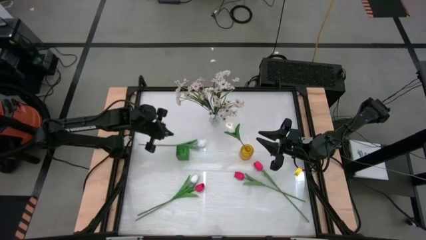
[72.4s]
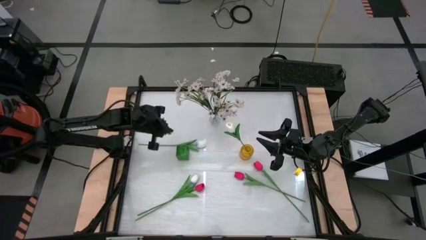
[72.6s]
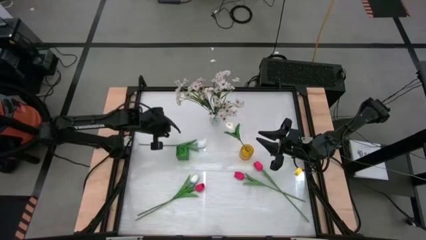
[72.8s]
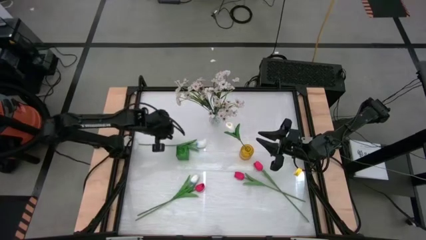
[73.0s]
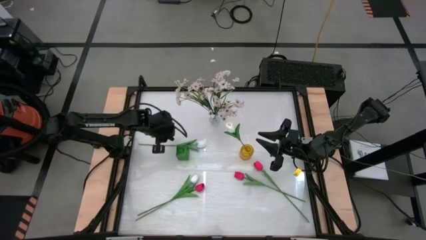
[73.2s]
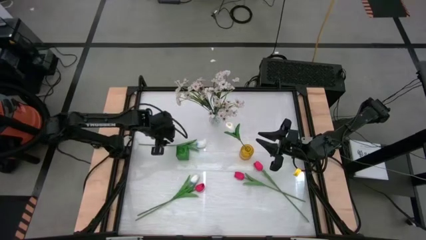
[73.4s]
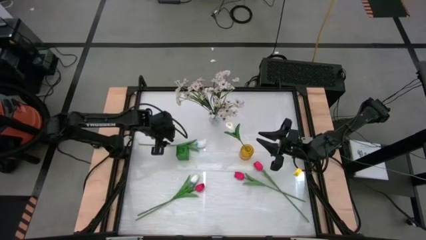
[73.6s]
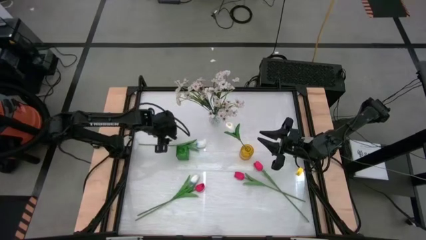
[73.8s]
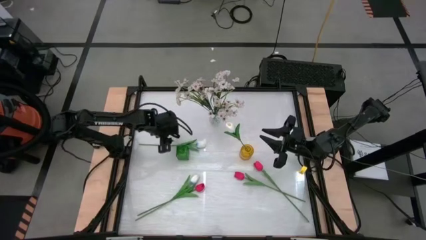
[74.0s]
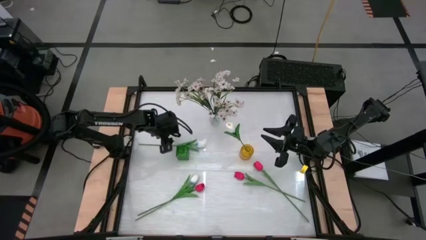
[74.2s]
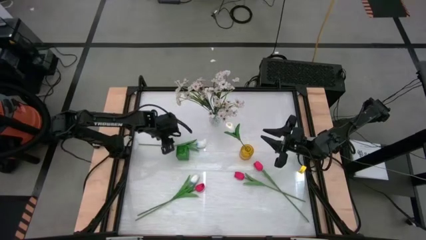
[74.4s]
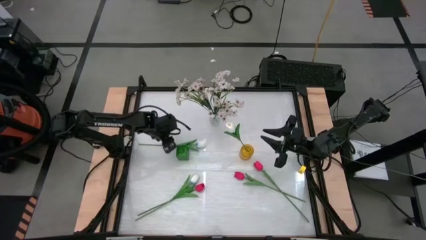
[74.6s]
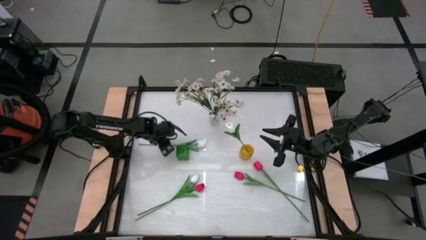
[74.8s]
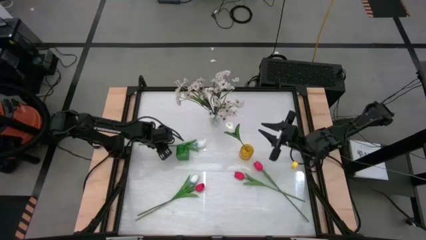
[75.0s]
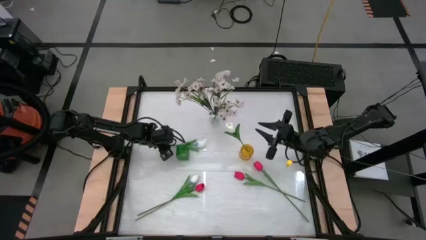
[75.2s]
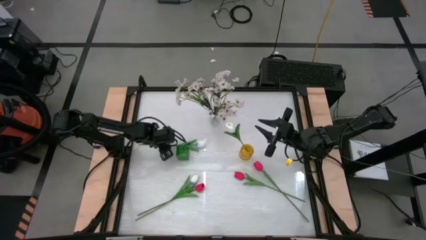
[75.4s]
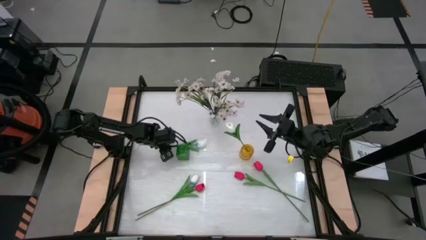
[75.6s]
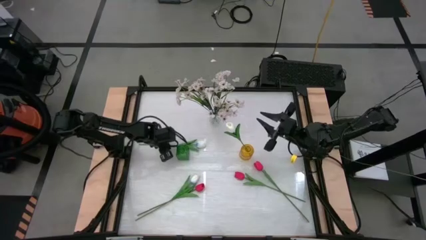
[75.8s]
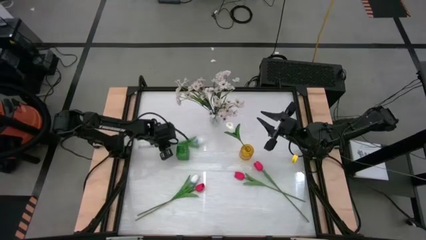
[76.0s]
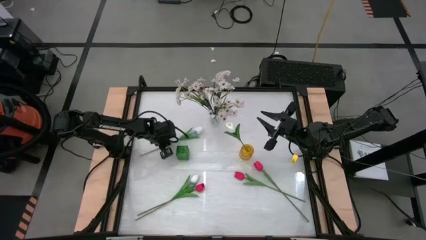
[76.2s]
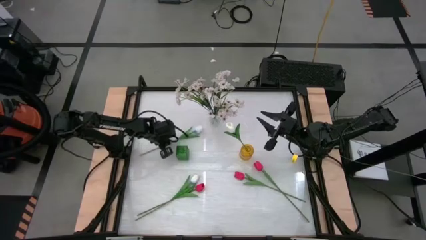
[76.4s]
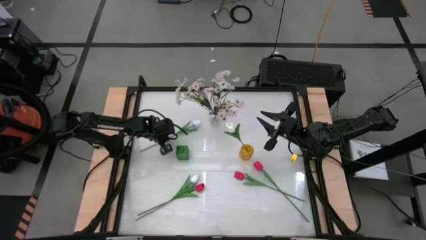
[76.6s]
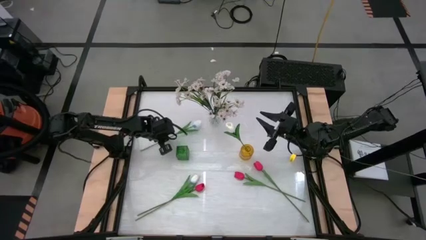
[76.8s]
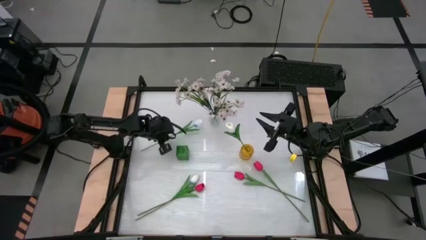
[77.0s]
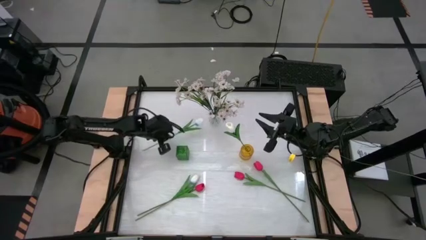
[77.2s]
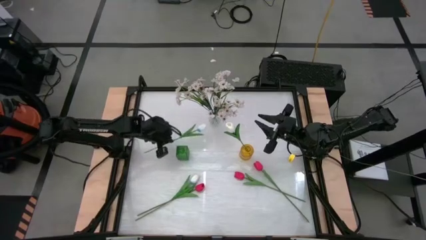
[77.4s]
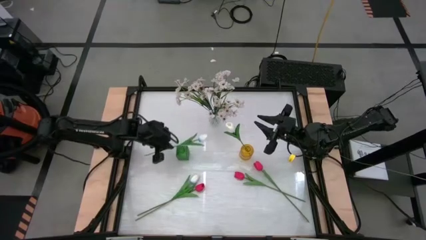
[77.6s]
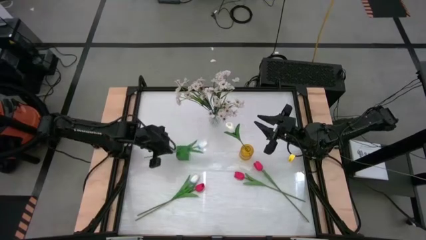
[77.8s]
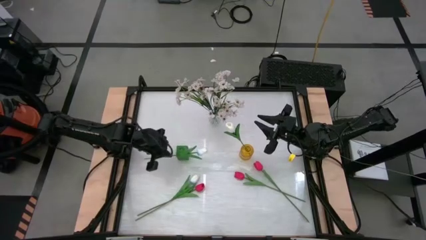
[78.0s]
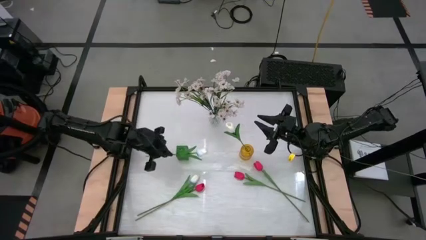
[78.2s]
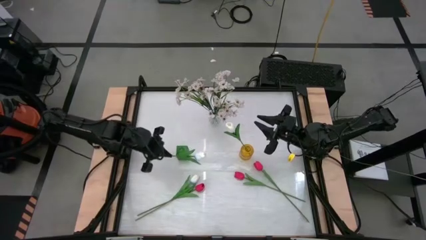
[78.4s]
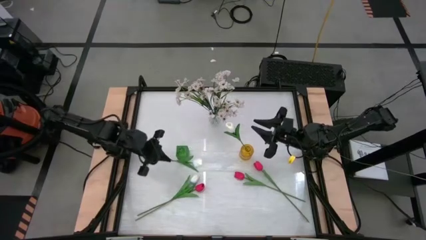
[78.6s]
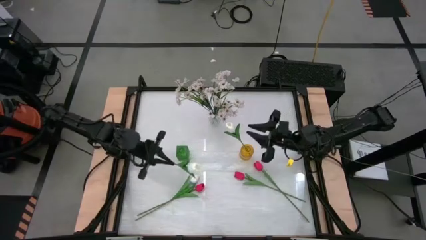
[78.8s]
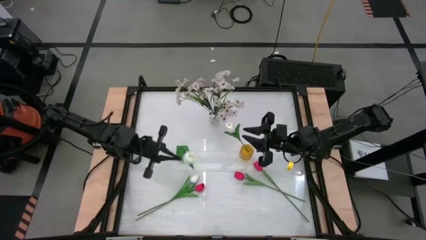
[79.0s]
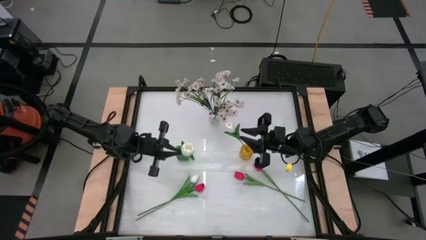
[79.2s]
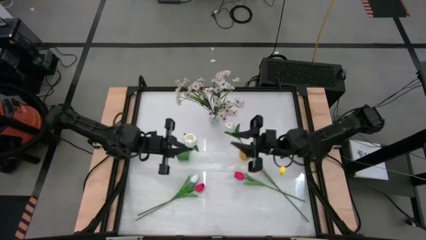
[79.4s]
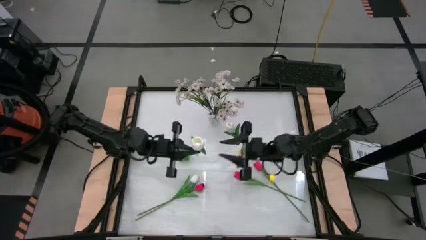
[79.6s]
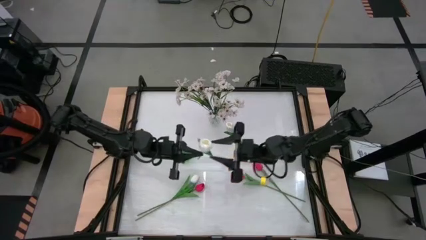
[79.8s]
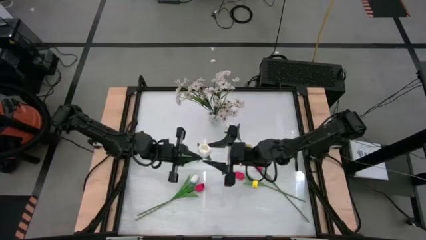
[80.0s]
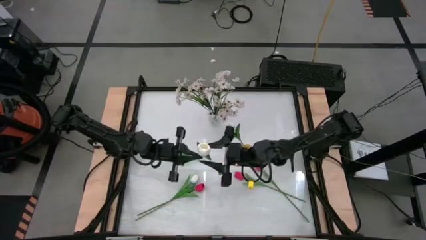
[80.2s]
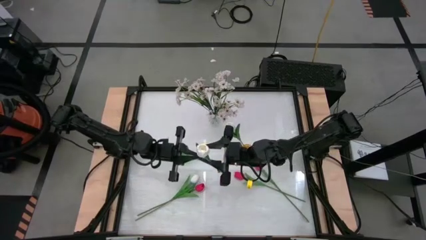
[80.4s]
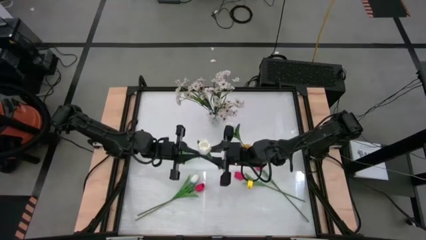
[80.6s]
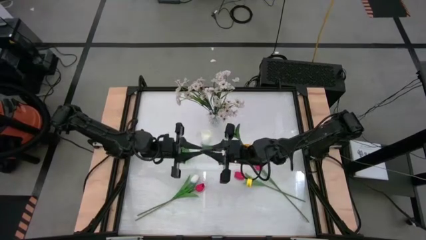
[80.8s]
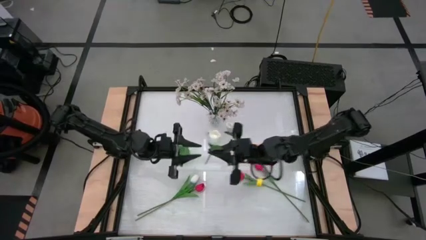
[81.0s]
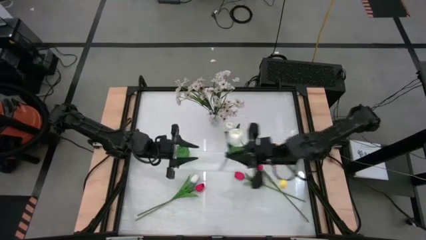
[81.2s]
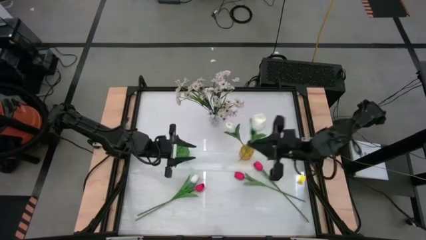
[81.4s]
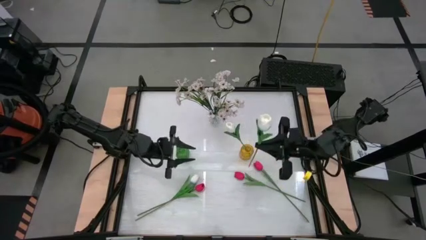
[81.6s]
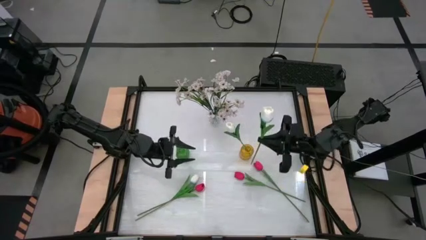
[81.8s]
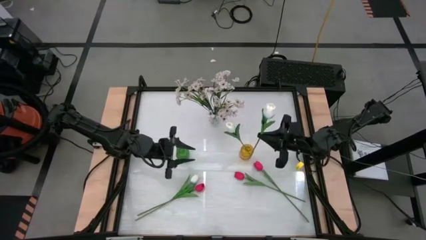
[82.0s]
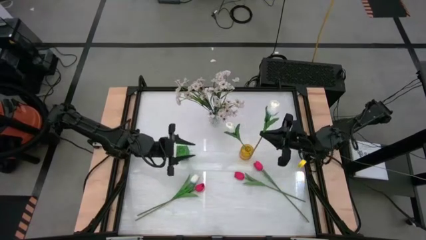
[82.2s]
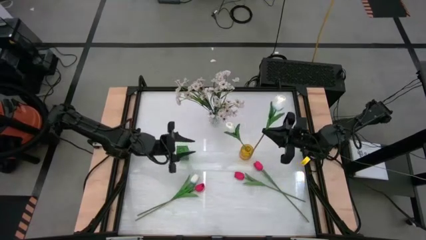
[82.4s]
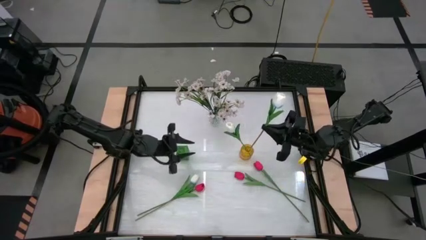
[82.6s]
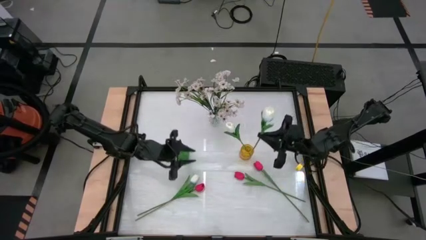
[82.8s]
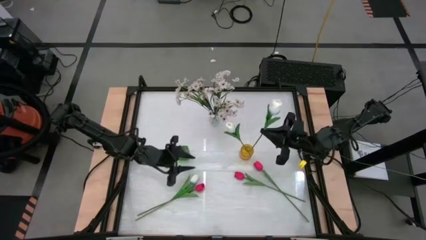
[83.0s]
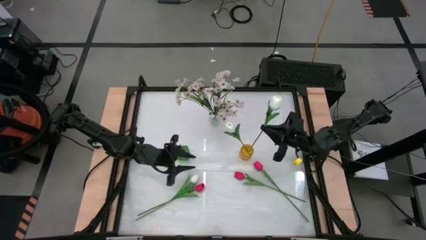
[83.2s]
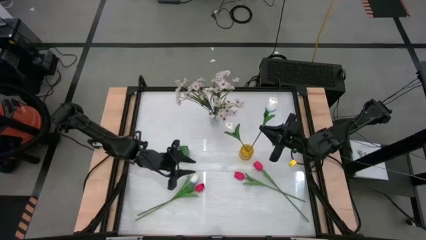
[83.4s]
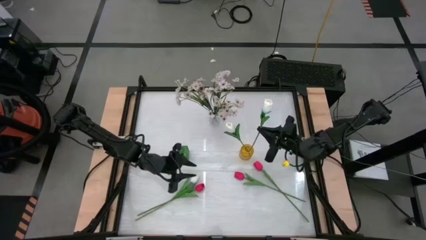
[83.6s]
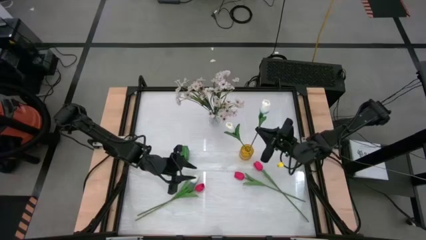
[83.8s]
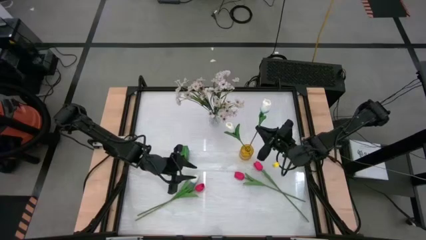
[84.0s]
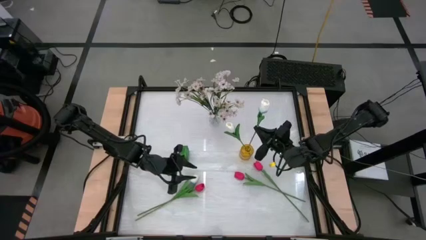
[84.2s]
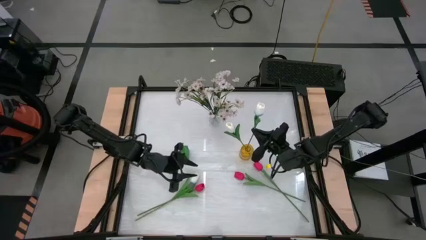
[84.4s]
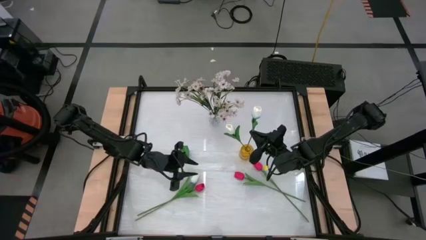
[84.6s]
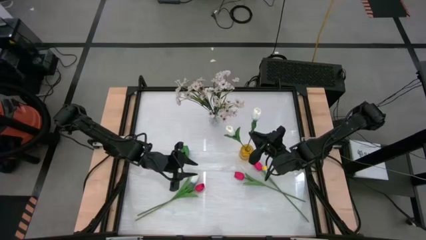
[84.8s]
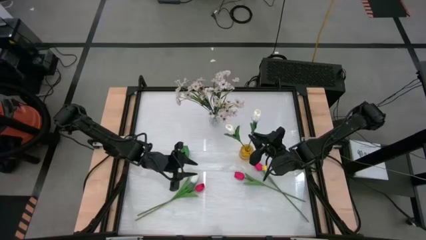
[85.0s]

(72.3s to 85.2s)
Task: Sort flowers into vase by color
Put the top white flower into the yellow vase

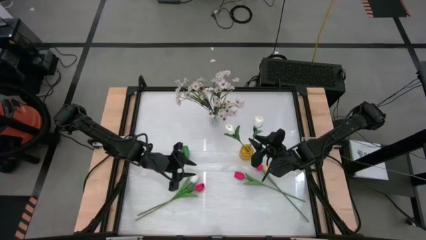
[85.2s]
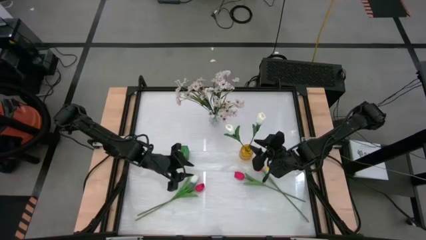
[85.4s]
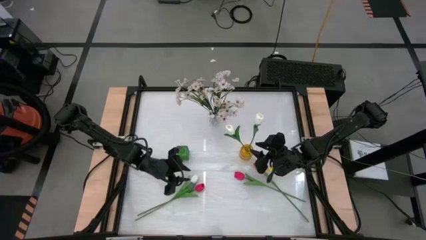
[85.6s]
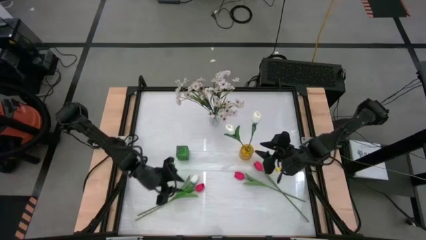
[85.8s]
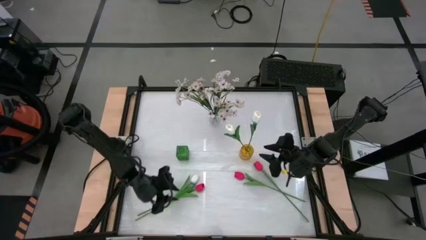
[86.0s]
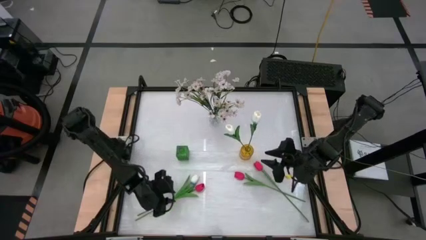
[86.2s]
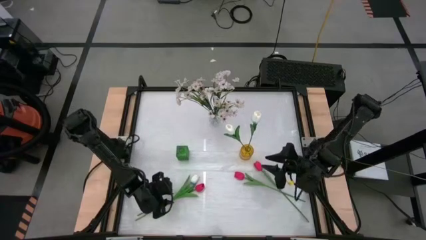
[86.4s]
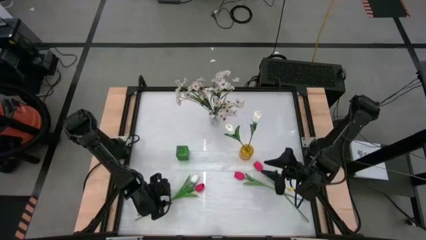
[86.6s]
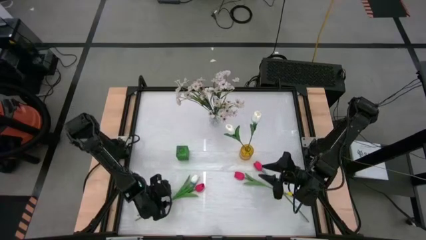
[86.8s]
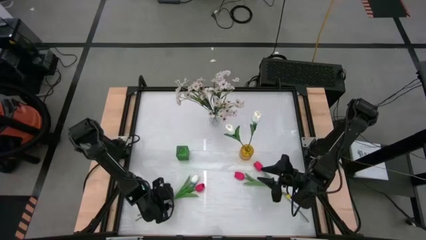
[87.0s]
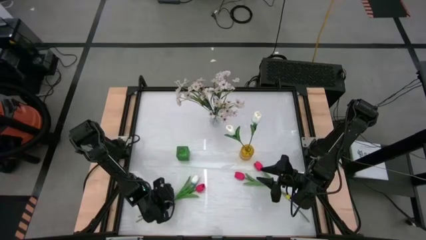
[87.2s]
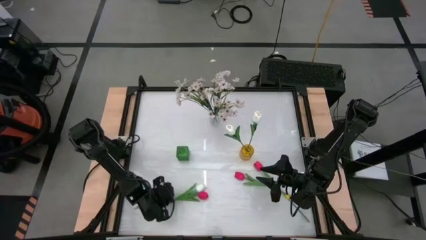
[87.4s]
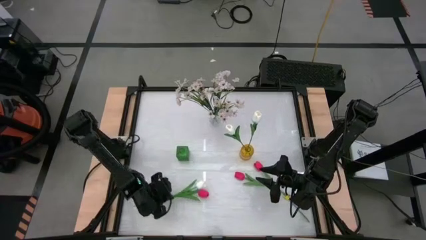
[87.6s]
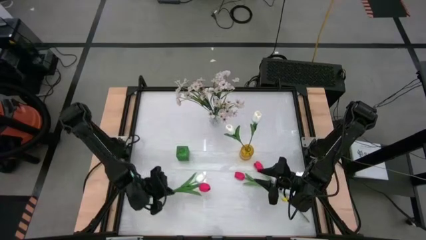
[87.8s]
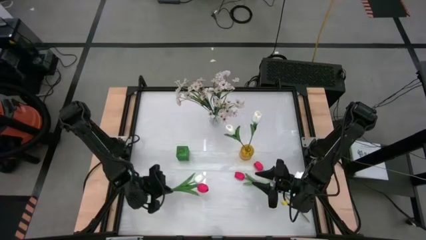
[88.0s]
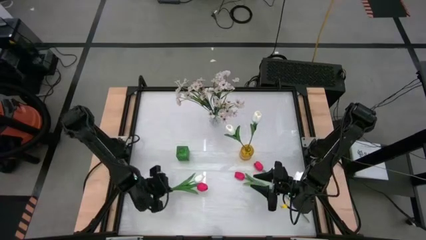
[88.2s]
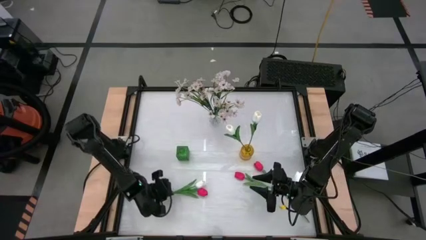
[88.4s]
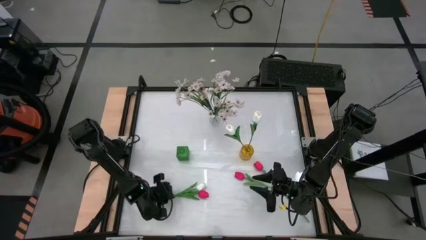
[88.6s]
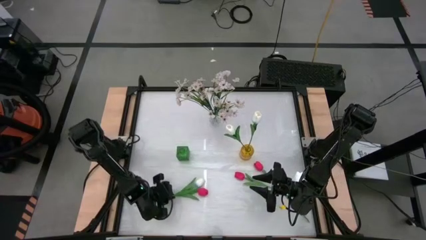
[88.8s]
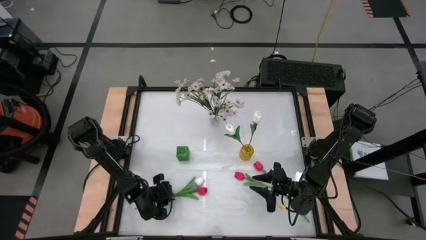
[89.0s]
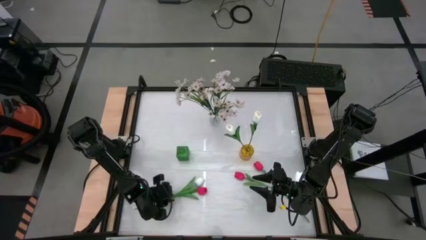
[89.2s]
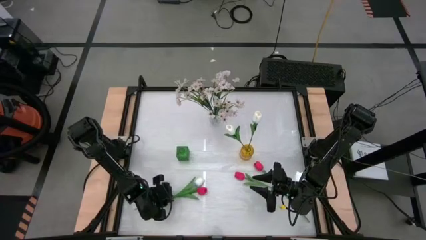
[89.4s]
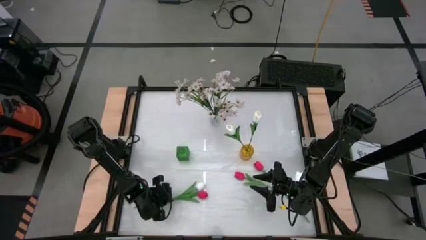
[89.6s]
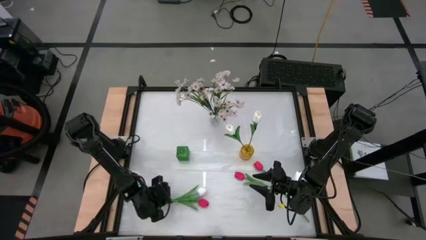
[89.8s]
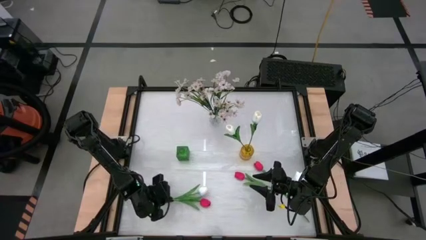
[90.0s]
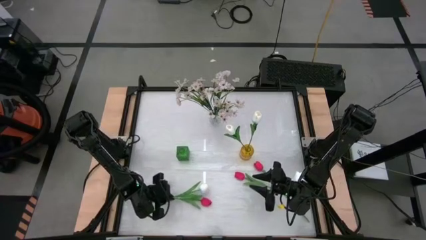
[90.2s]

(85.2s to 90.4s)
Put the white flower into the yellow vase
